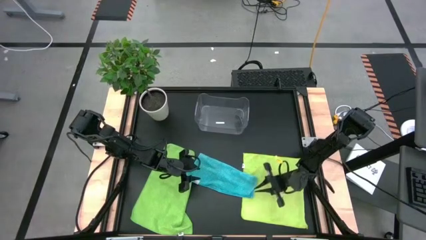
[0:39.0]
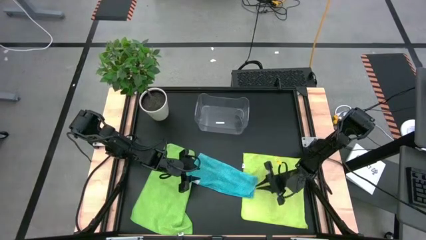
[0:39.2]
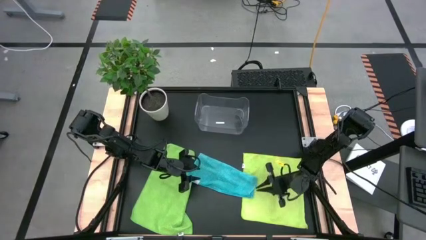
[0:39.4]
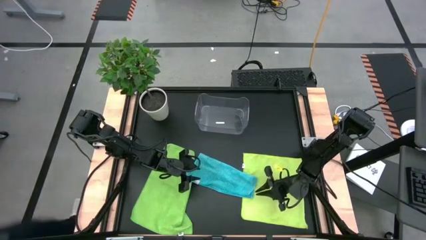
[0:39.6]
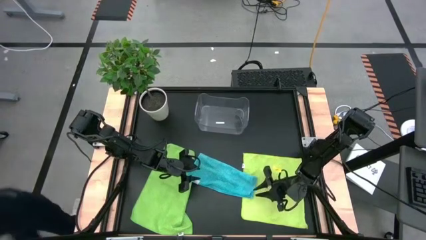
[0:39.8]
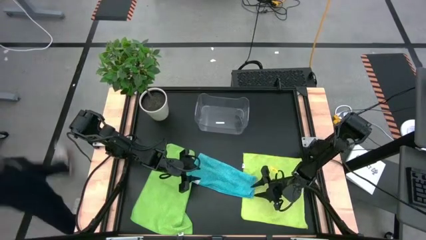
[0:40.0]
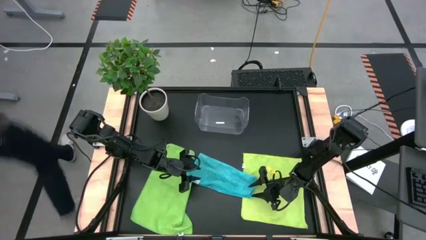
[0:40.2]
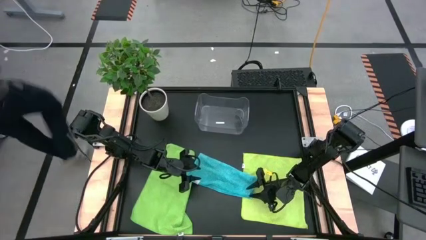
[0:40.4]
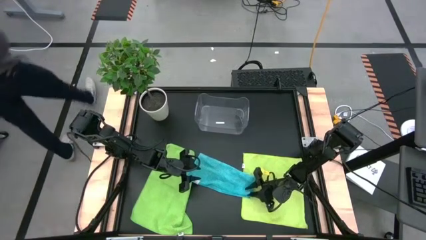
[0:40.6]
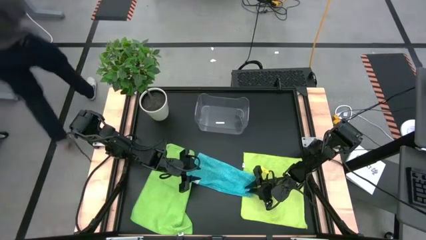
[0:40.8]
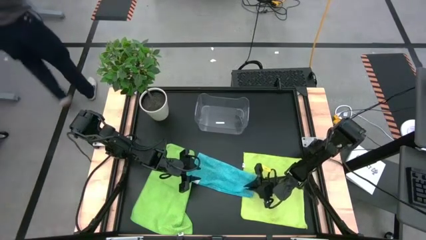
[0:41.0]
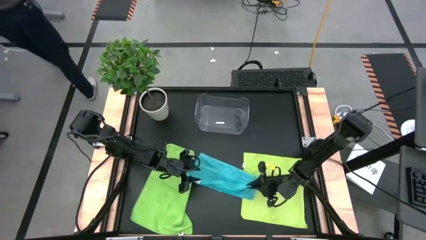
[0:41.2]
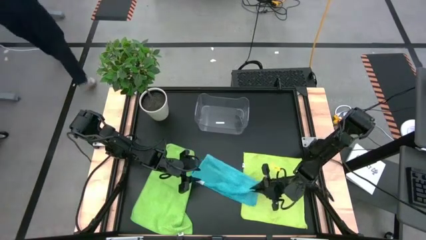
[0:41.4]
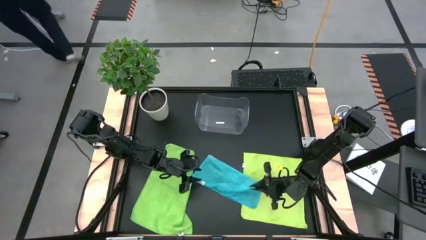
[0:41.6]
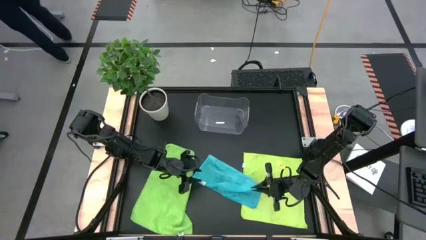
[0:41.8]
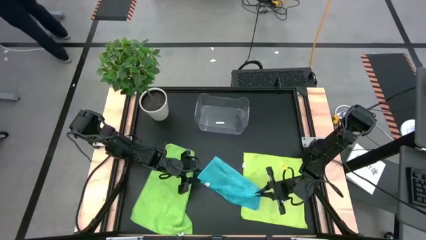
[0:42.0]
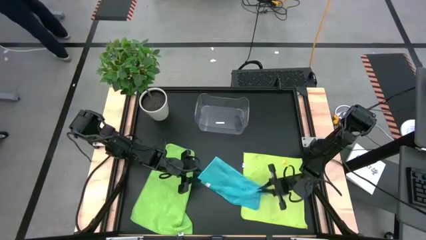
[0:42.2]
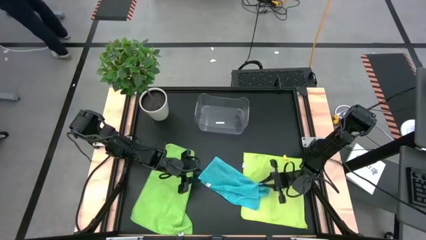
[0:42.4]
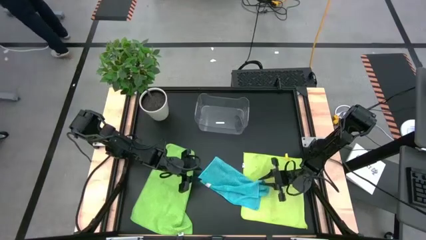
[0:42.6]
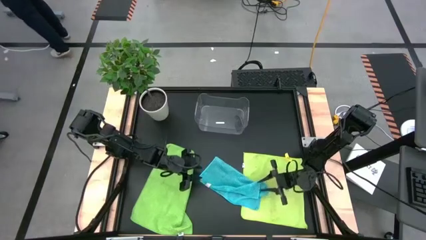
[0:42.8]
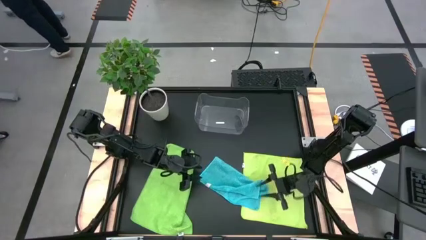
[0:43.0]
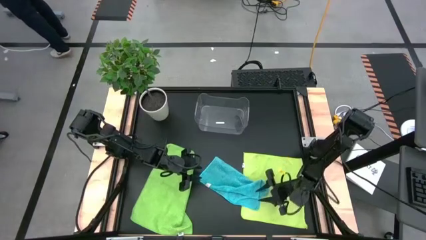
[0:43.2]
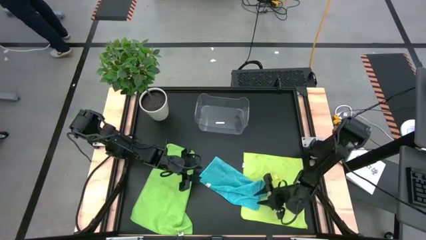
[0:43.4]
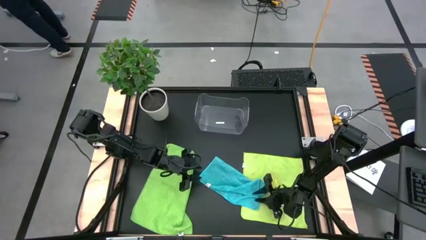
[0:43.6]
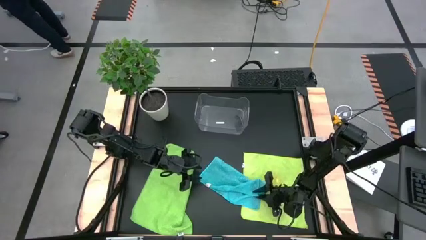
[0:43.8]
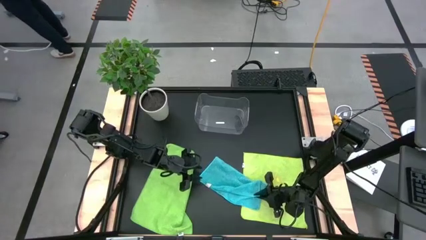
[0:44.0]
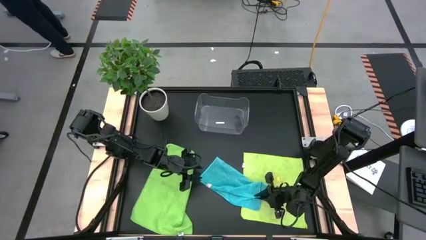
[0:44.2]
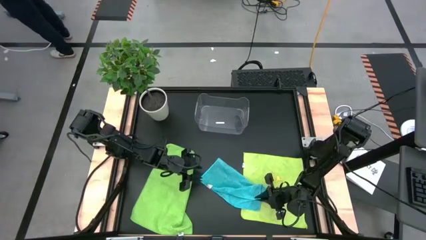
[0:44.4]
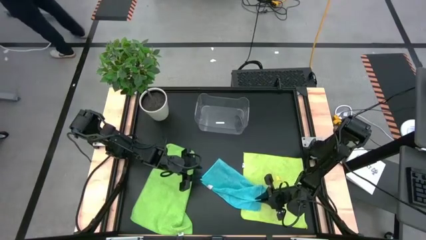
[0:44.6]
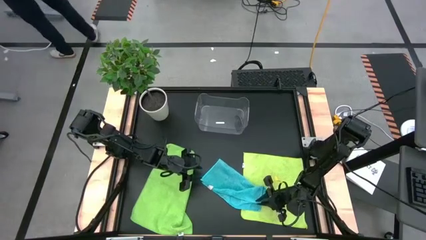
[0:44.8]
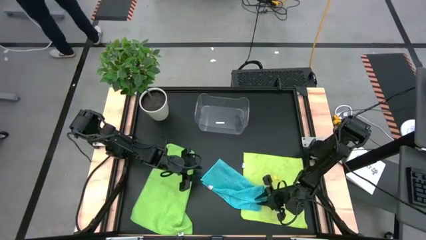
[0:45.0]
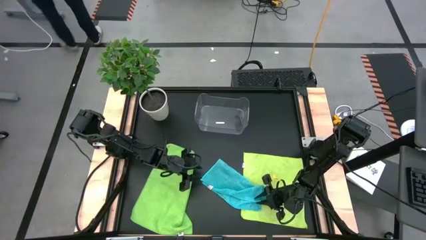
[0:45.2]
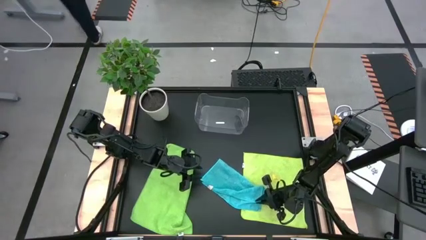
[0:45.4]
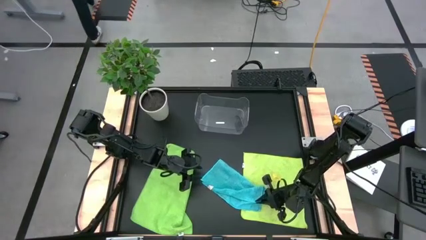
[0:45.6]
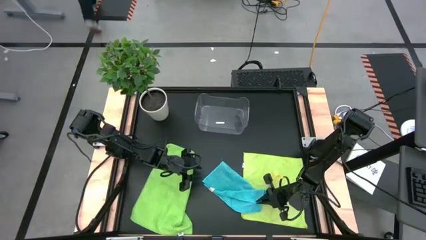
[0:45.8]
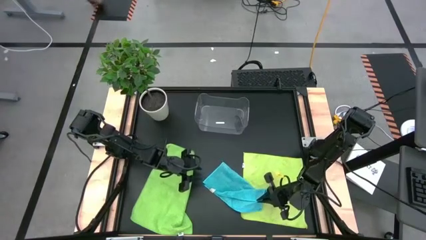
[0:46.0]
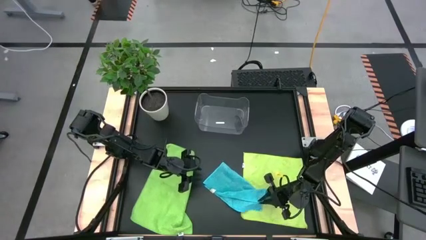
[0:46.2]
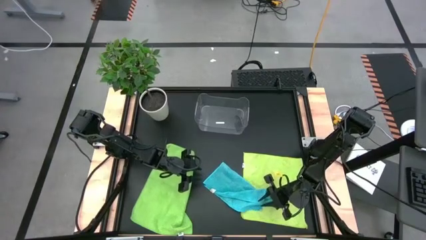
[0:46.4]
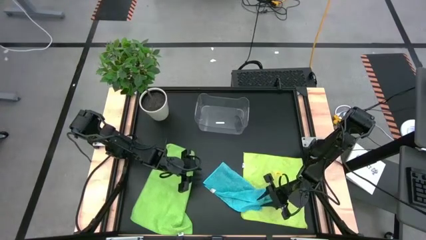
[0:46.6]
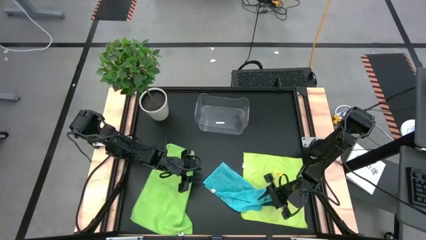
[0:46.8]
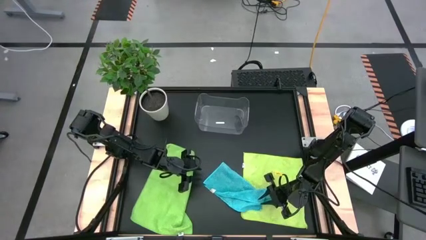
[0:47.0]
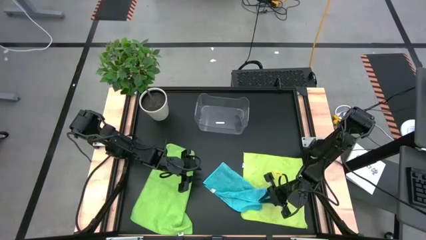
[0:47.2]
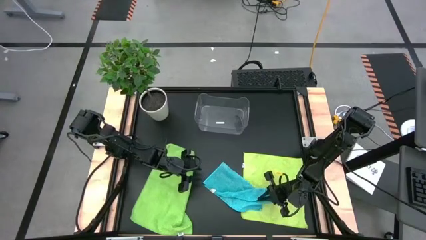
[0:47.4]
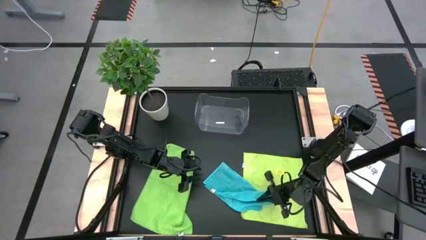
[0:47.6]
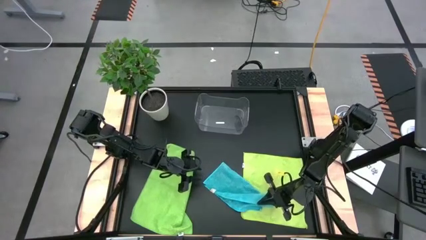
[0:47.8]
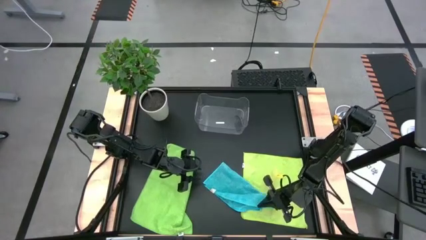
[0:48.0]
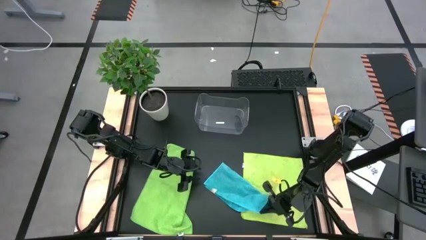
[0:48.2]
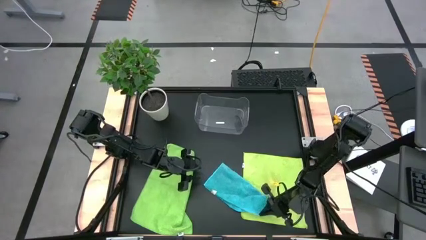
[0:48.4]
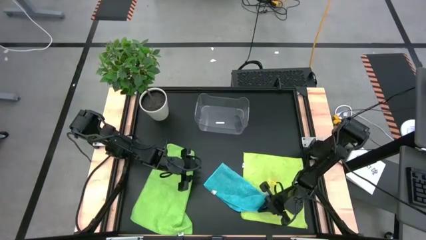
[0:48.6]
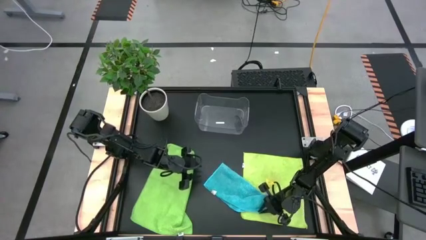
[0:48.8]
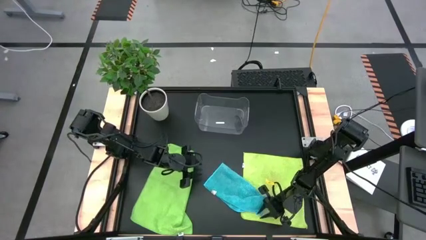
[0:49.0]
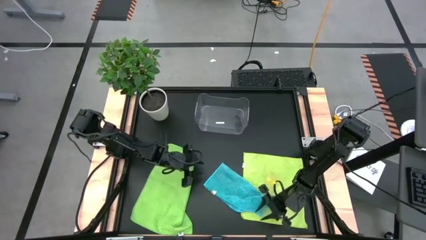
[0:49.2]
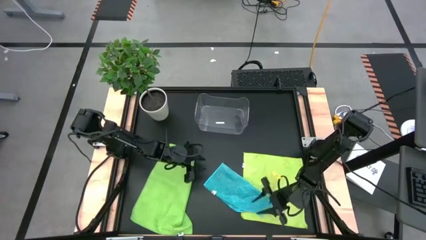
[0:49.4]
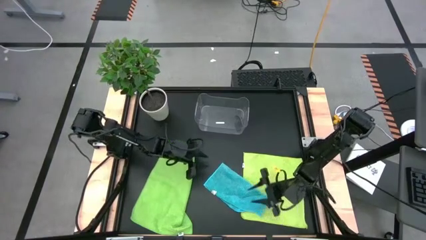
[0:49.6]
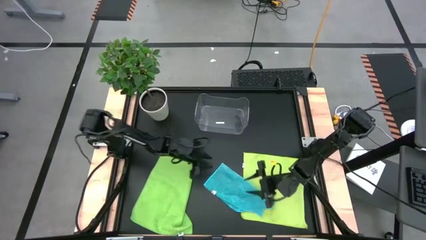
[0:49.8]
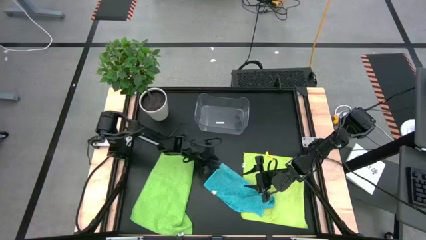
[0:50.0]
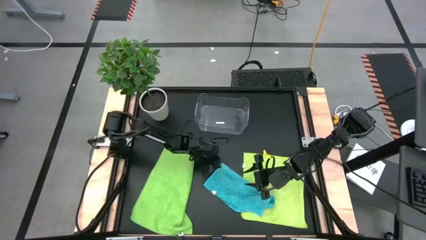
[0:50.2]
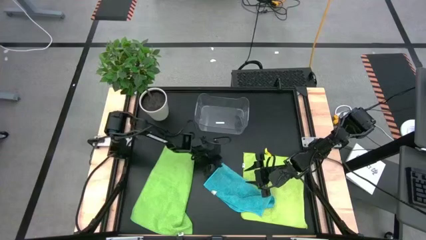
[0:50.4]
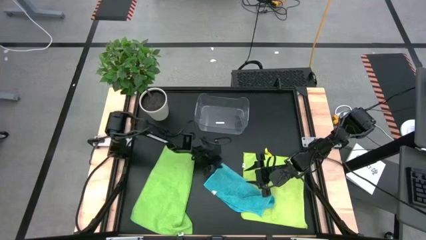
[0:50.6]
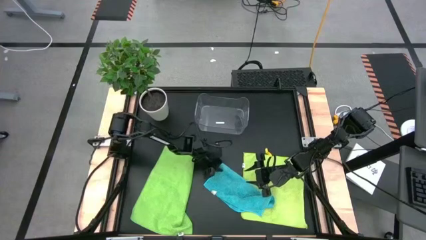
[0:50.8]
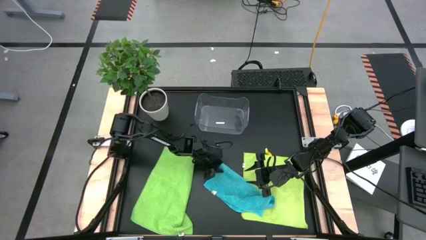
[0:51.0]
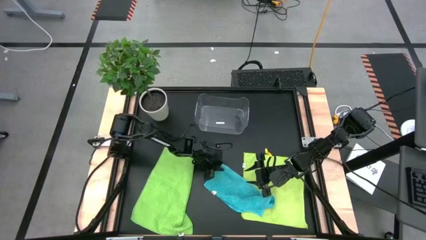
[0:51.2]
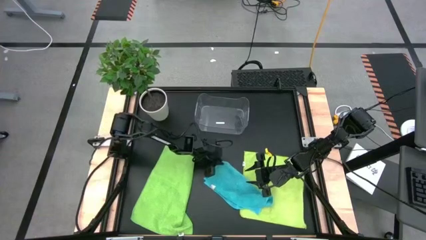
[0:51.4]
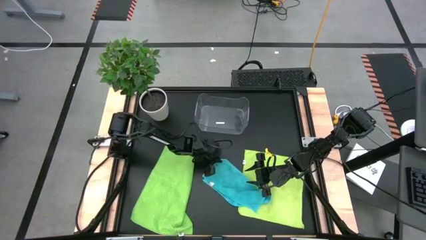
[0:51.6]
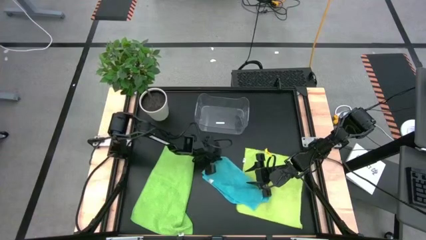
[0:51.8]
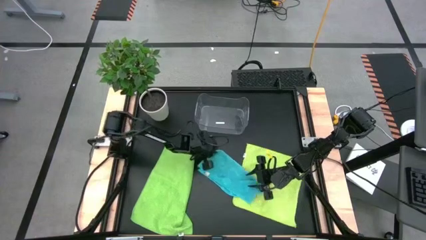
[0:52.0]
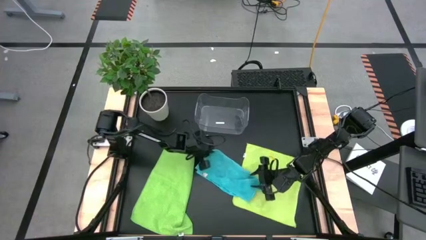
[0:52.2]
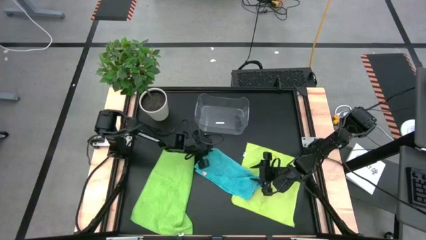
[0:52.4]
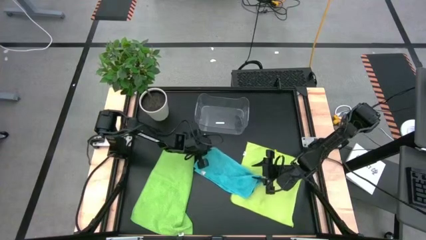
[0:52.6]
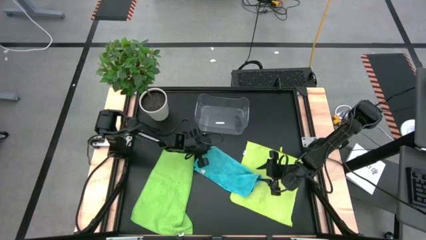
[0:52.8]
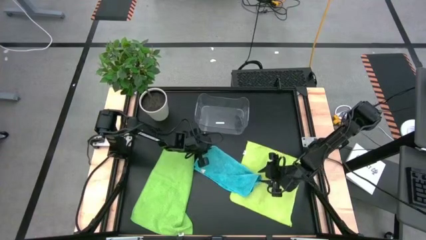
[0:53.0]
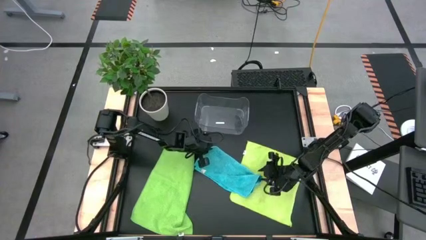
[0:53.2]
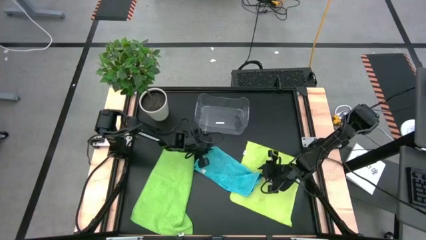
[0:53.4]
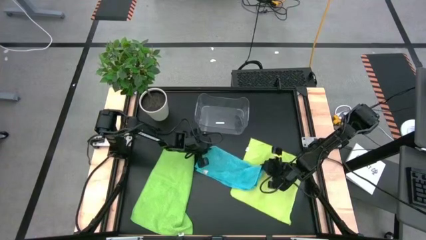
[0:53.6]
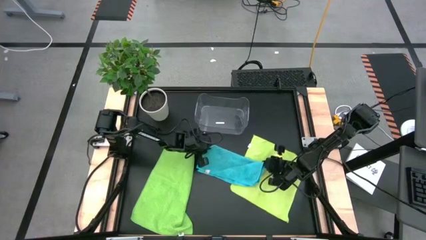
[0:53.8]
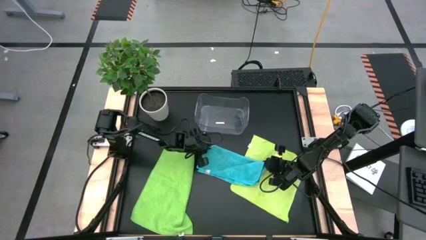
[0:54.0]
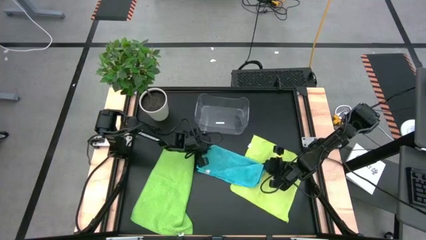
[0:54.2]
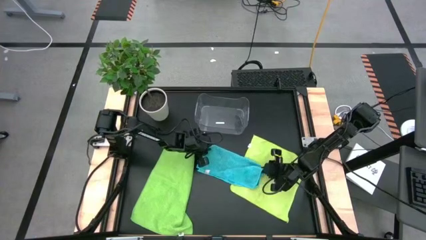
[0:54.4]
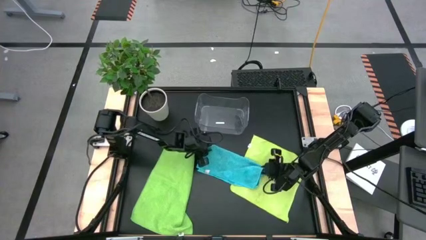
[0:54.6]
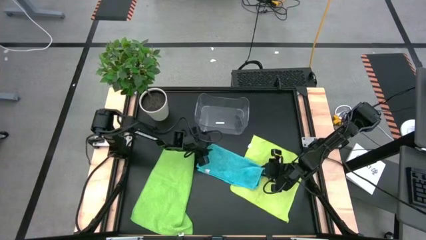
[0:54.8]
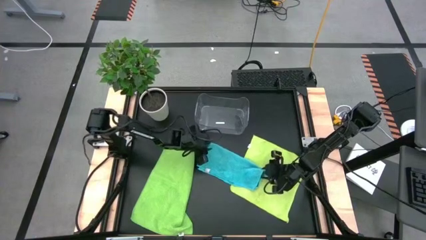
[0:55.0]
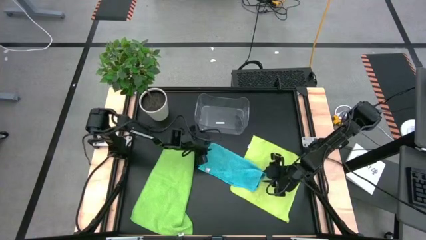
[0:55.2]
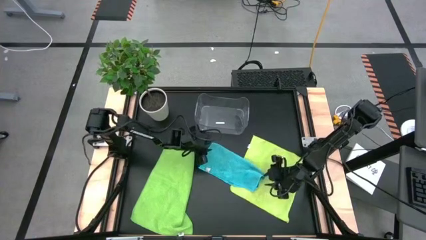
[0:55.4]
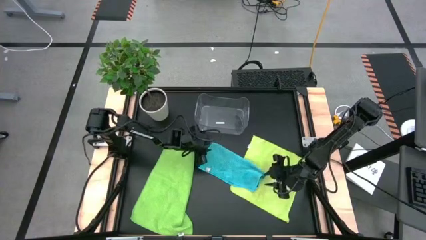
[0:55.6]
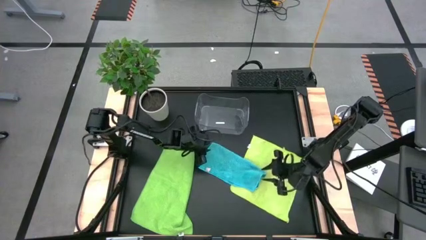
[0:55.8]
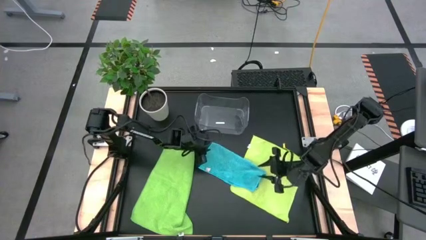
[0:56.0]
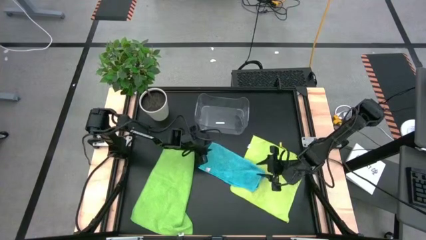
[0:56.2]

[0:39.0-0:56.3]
Task: Fold microfiber towels
Fold the blue microfiber cloth
